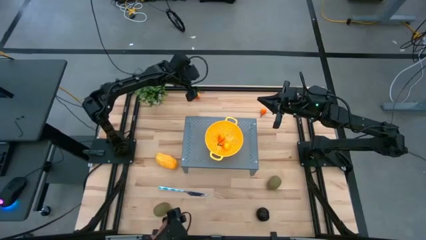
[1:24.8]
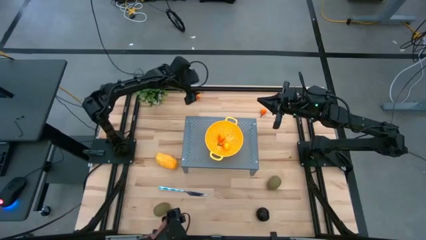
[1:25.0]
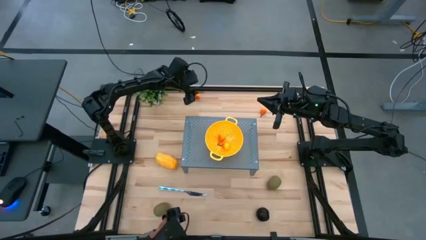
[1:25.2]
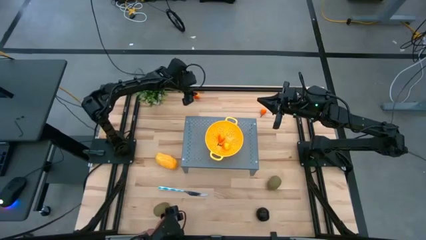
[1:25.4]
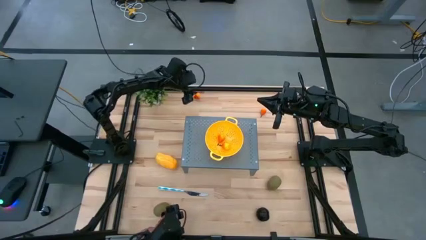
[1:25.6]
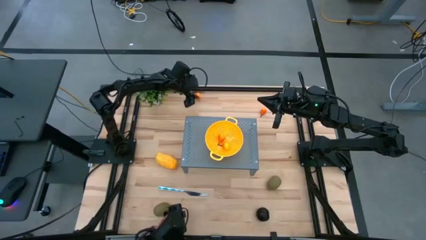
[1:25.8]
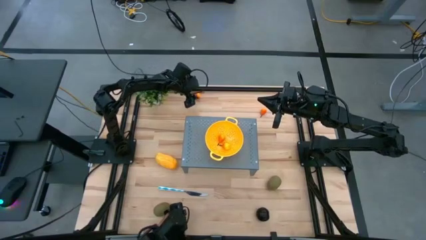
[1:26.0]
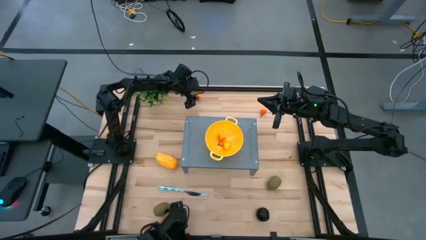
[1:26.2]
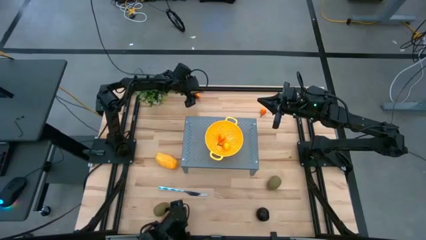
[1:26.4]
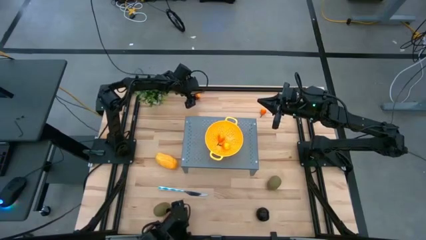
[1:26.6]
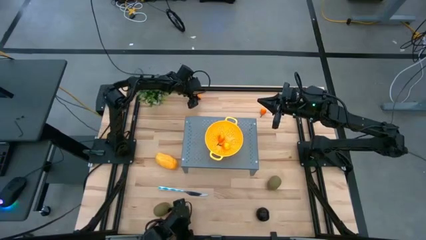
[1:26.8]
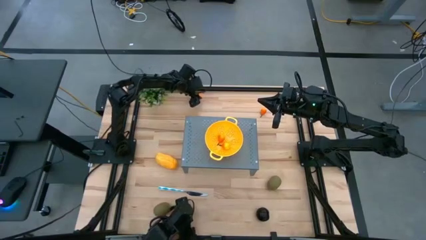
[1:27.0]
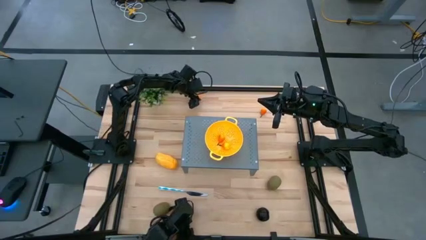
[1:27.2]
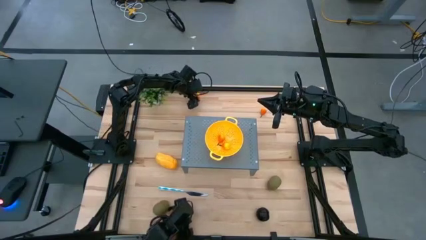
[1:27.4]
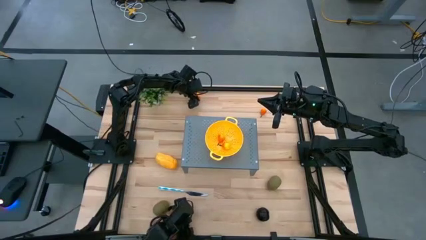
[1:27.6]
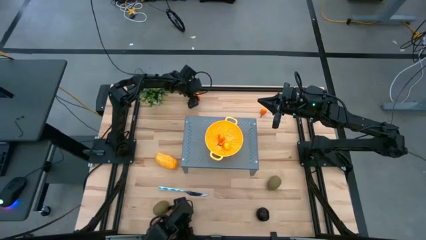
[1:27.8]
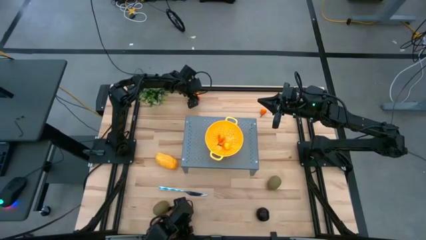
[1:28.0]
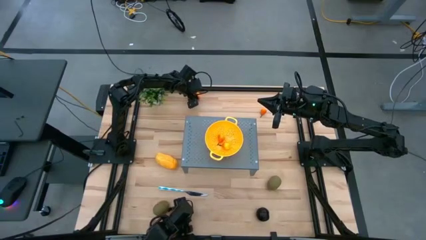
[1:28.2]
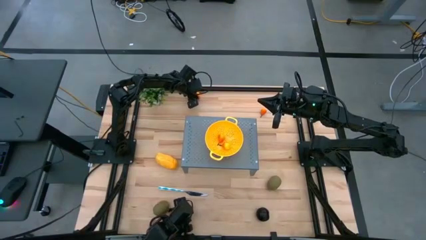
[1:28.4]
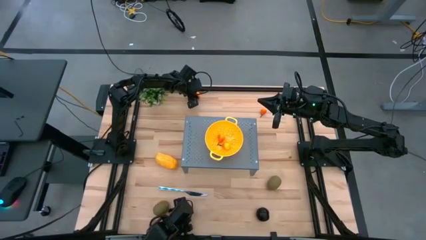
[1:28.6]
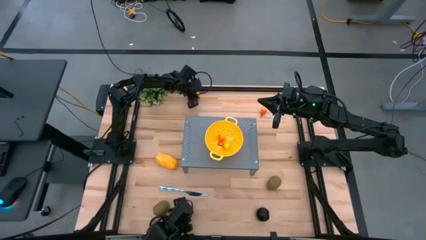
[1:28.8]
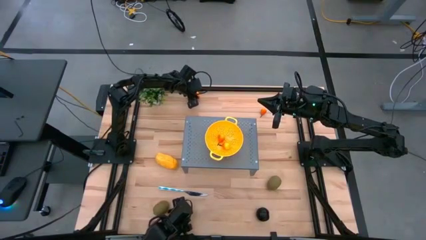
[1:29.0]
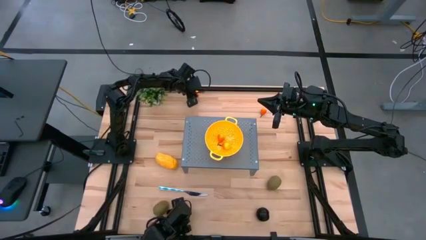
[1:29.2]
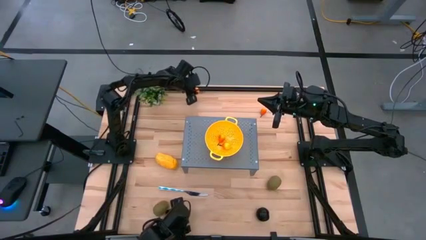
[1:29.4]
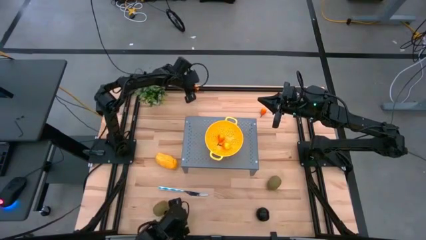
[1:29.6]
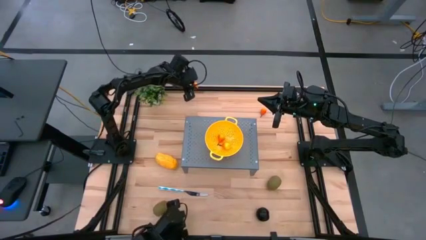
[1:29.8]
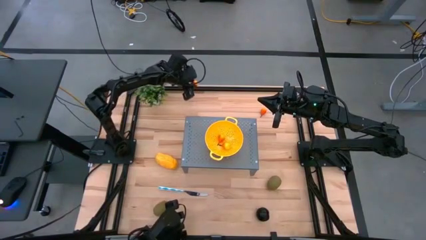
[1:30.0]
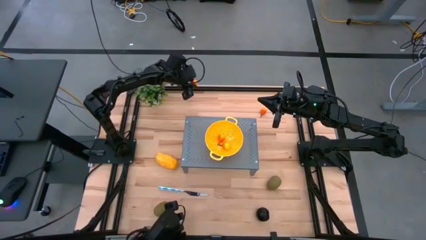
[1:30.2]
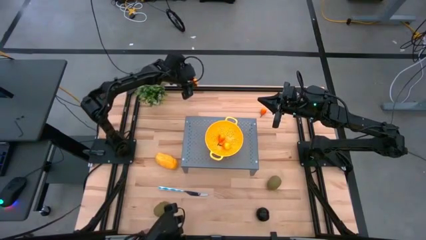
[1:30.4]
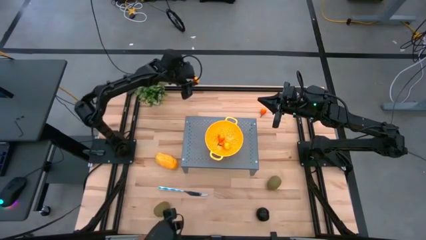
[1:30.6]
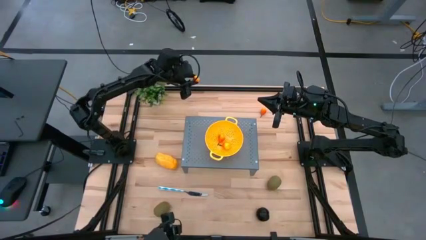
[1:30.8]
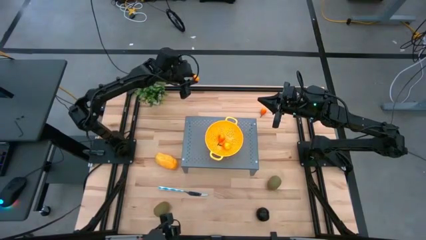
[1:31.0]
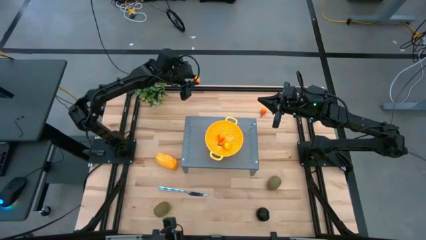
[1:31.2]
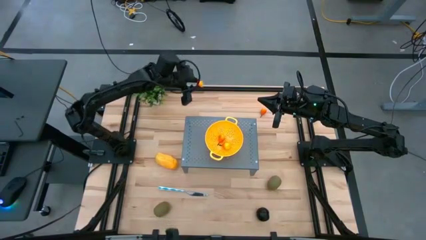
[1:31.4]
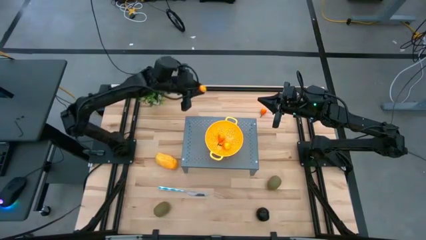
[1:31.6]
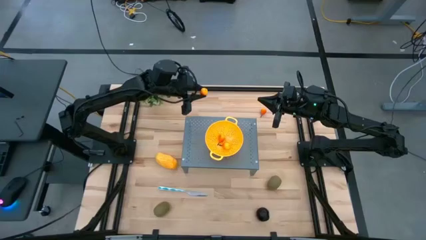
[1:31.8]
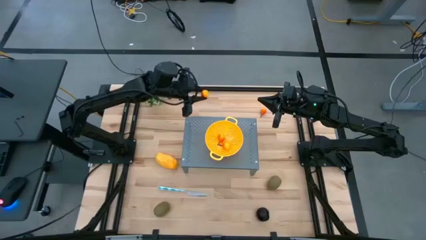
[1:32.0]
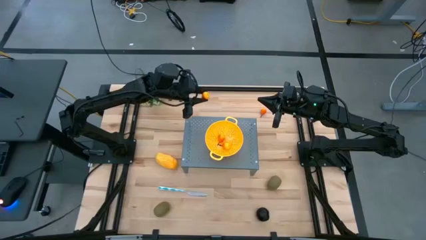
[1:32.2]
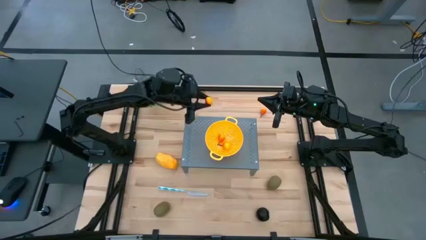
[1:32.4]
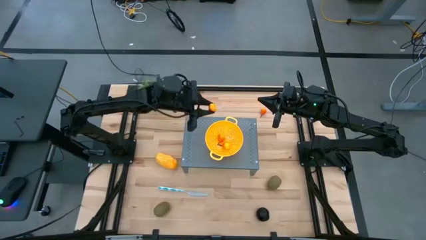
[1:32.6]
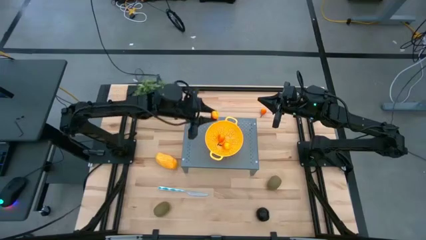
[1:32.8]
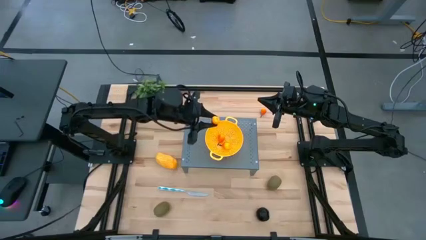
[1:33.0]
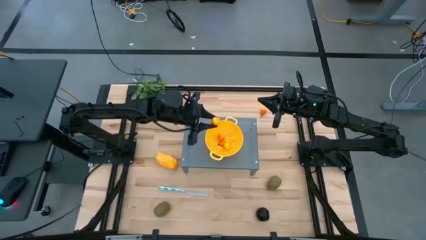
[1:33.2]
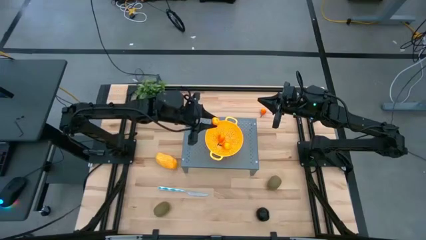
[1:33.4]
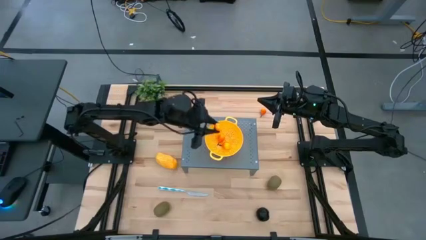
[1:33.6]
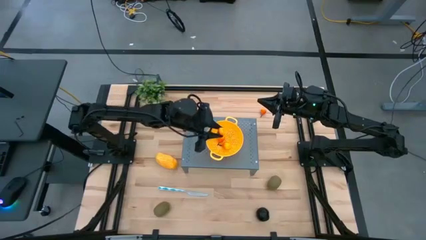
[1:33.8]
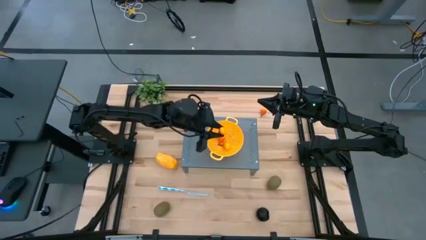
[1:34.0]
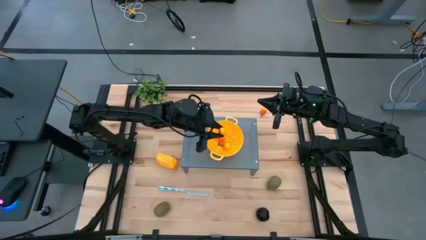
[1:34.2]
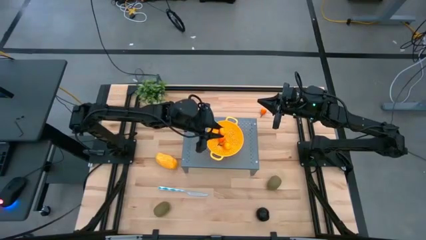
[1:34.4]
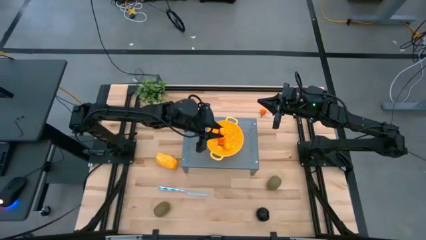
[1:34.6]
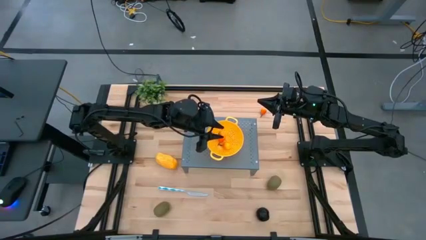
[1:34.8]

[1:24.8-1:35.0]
Task: Pick & Place Fruit
Put the right pear into the strainer bowl on the shelf

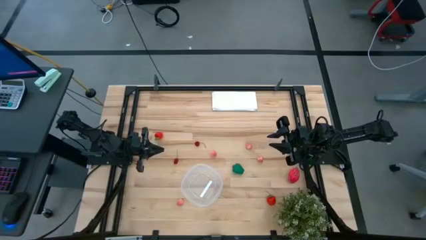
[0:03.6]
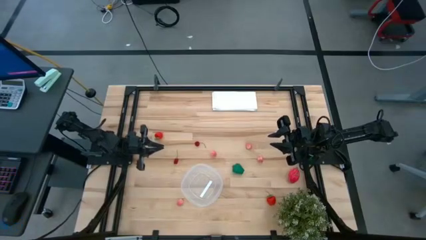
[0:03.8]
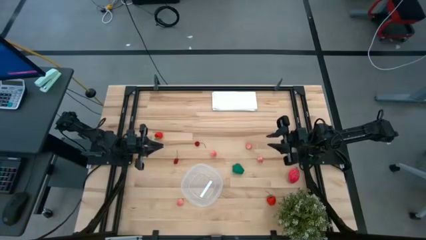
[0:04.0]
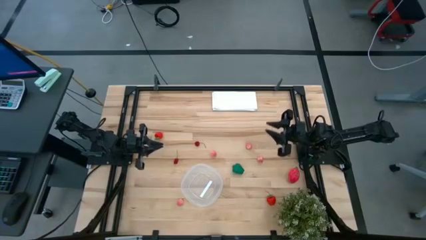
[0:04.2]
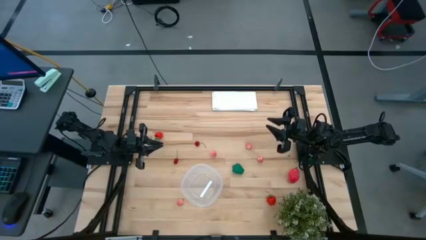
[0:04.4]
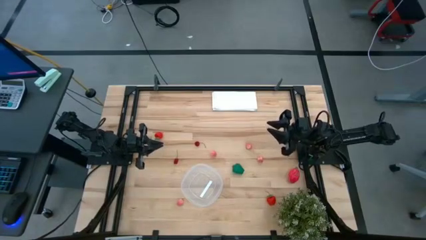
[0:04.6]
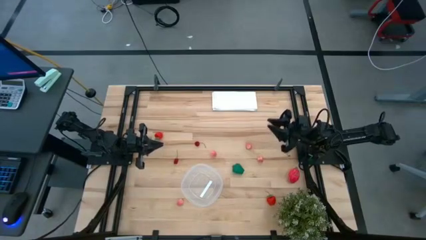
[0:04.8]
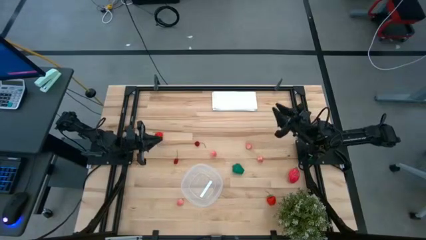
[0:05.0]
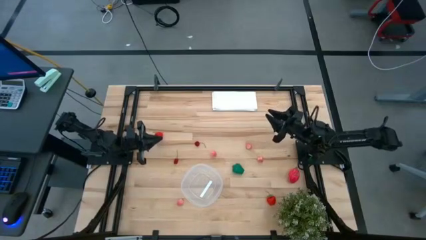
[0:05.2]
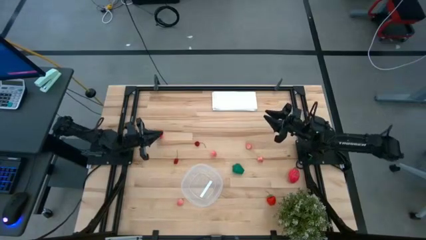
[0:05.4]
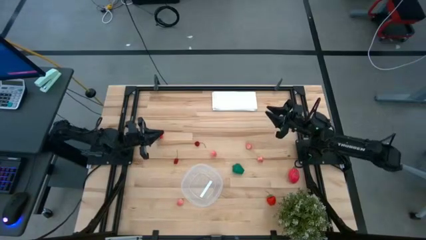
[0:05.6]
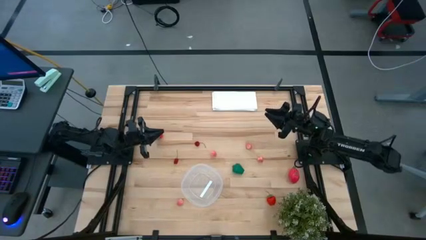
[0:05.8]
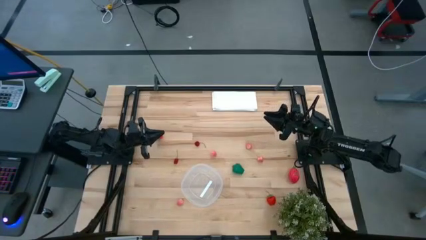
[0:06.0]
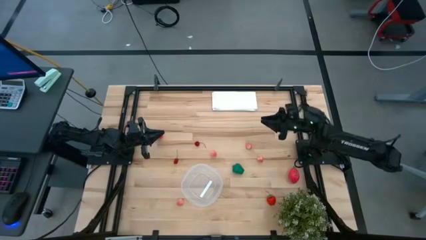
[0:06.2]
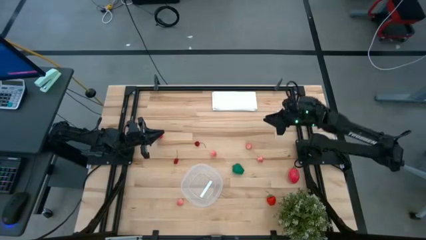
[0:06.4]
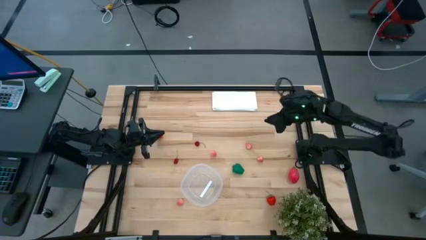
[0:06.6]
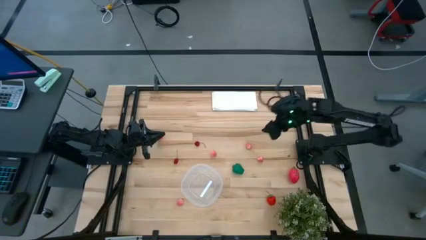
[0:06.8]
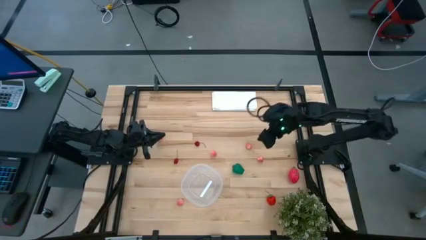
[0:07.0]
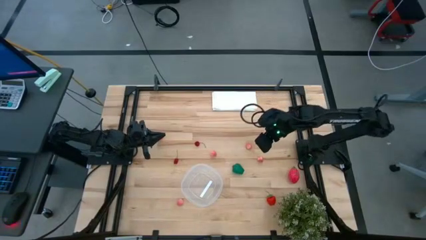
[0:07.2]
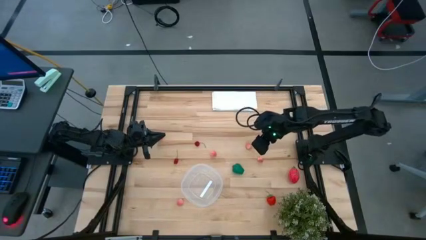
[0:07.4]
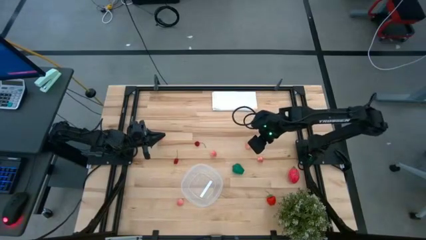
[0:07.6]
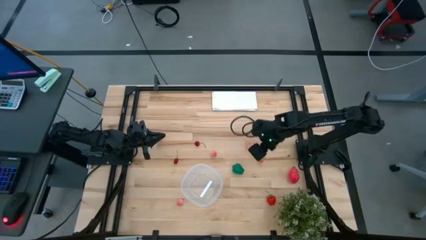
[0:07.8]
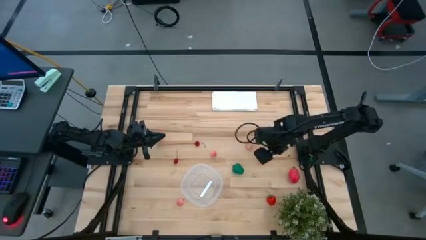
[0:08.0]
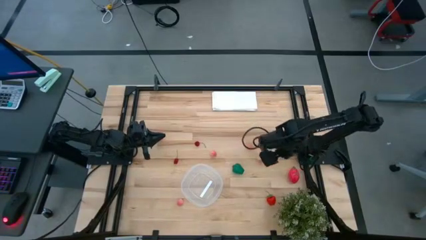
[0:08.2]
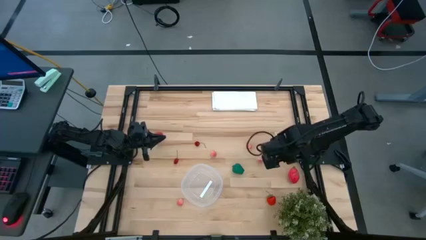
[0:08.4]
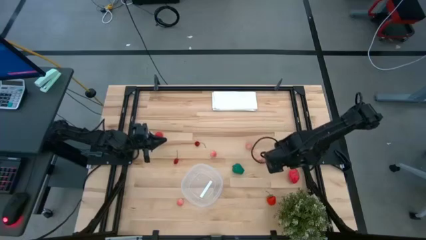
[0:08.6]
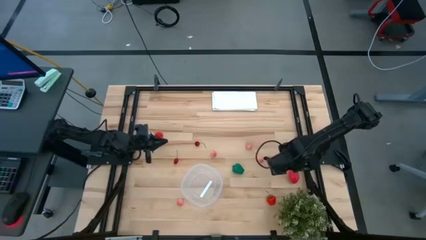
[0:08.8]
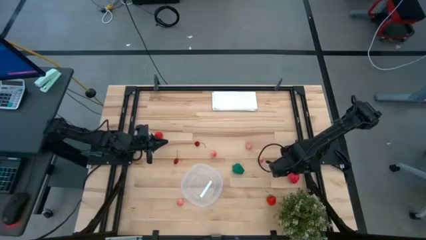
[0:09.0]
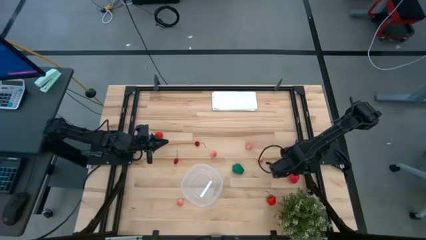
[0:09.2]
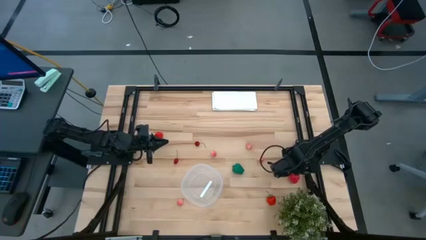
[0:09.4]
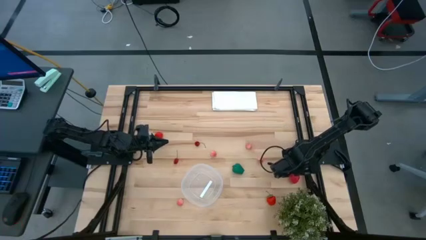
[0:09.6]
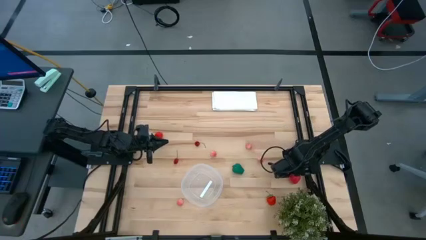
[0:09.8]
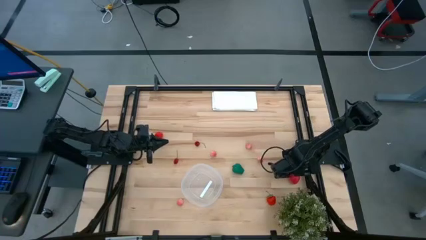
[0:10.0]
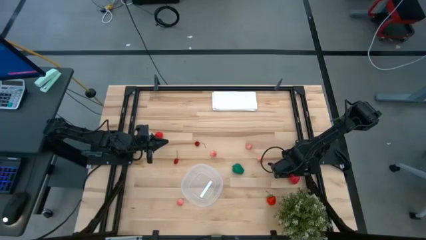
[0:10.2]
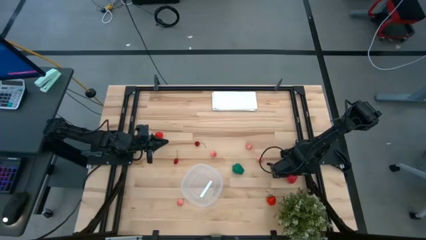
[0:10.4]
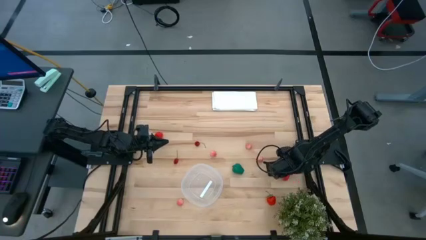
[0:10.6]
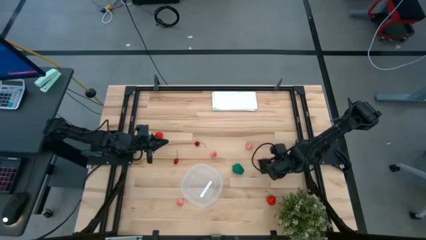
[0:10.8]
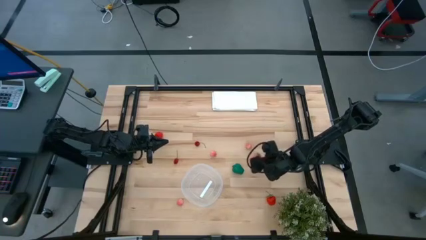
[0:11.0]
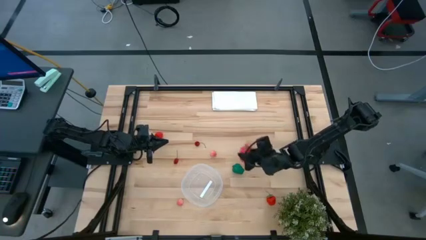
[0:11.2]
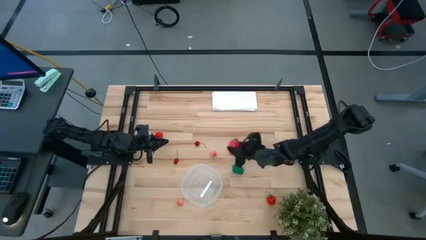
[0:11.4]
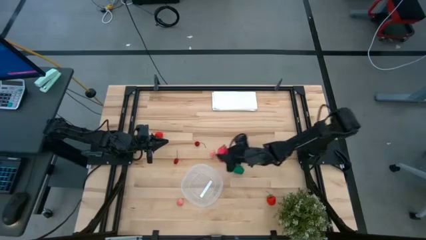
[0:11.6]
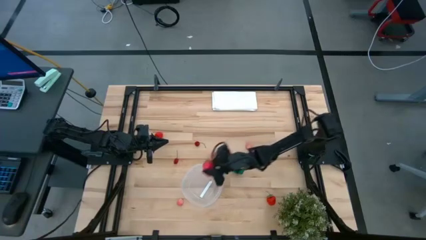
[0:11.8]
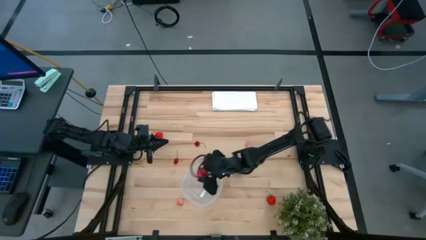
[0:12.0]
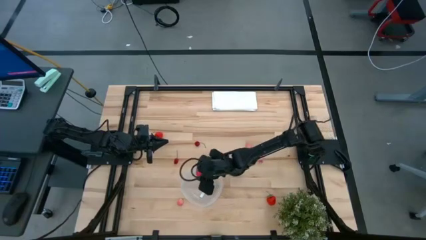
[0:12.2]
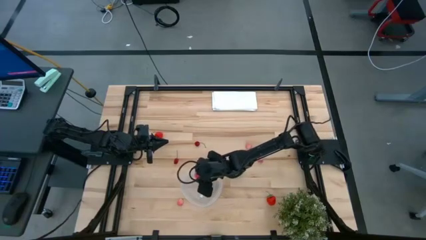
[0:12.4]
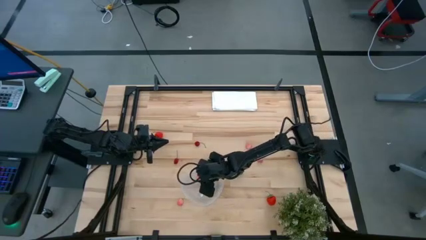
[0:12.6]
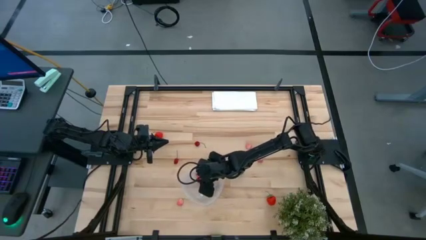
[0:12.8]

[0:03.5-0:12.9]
Task: Pick and placing Produce into tupperware
Put the red dragon fruit into the transparent bin
